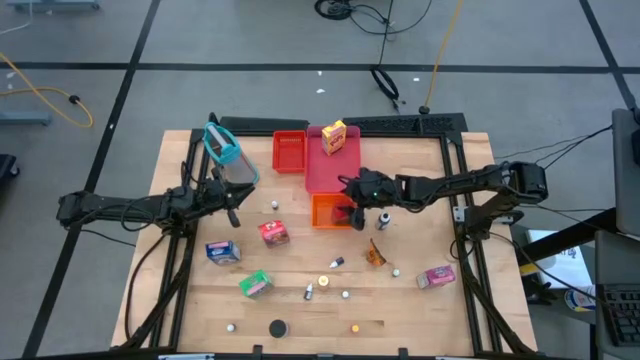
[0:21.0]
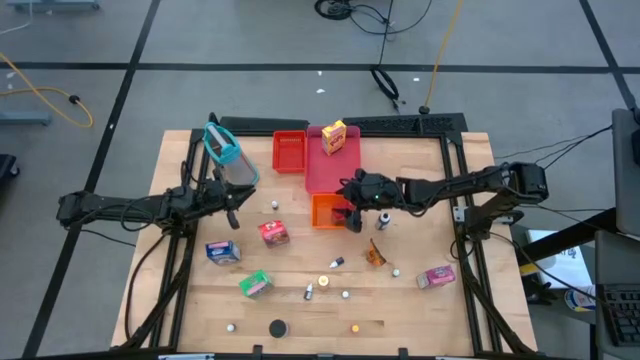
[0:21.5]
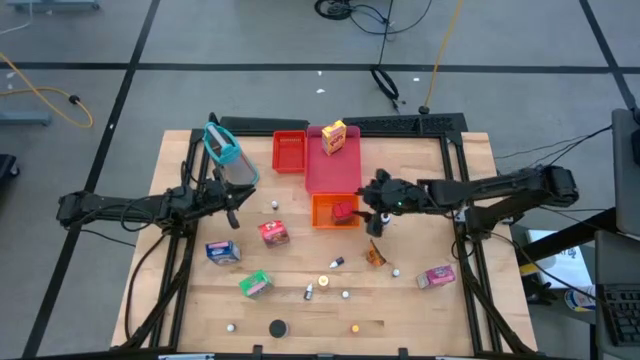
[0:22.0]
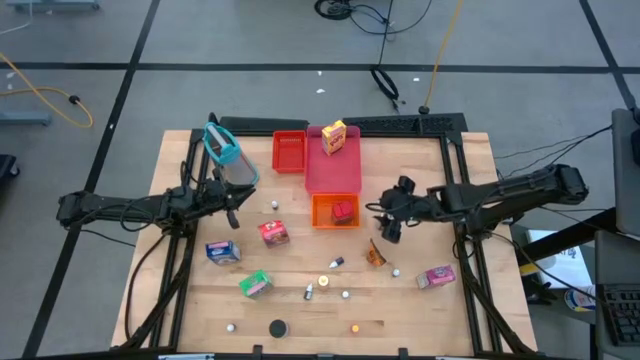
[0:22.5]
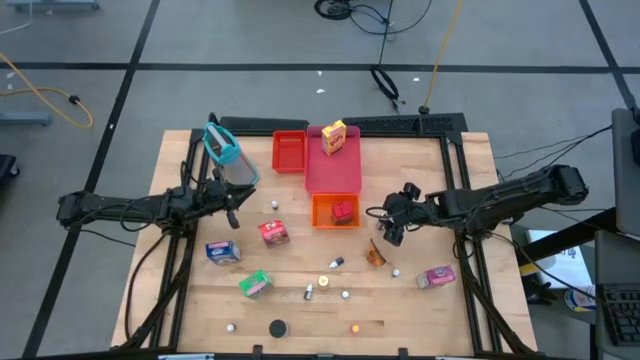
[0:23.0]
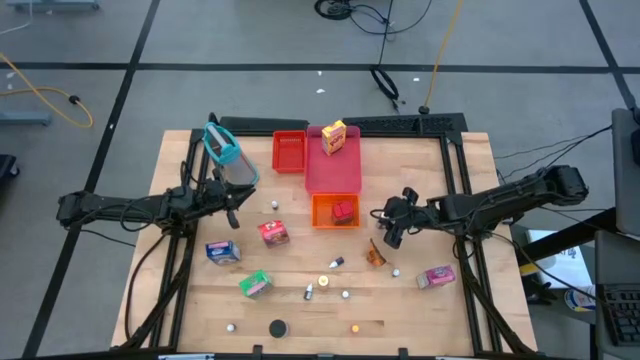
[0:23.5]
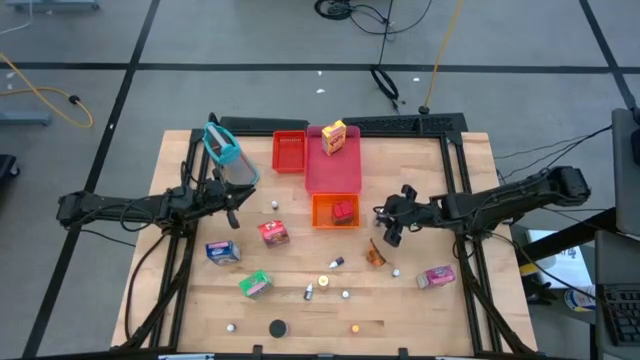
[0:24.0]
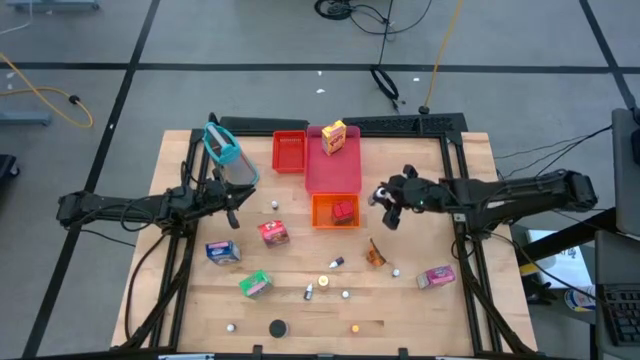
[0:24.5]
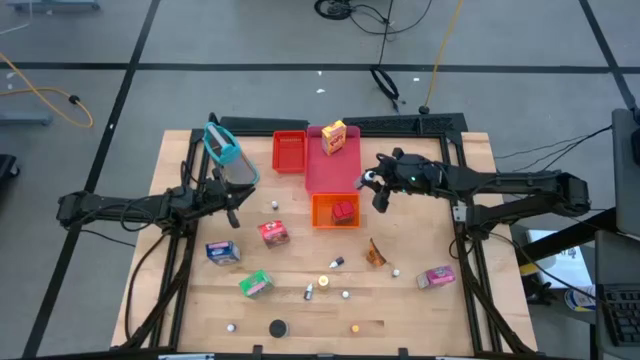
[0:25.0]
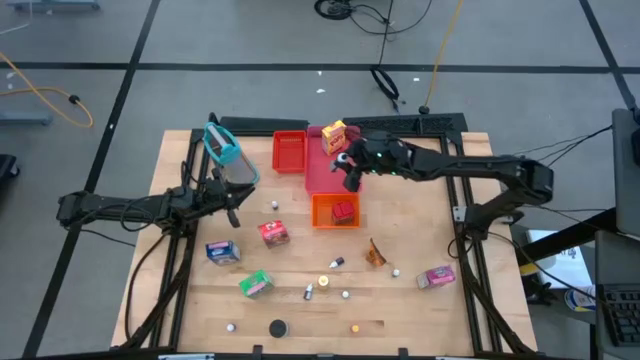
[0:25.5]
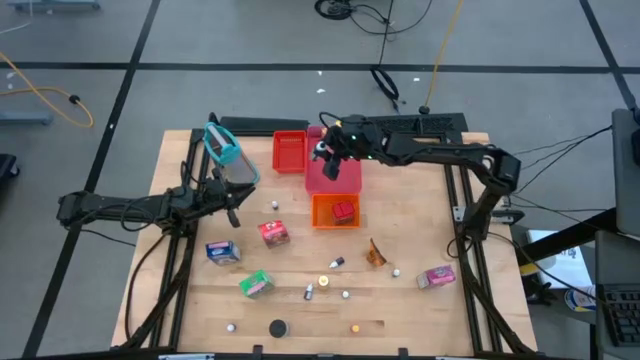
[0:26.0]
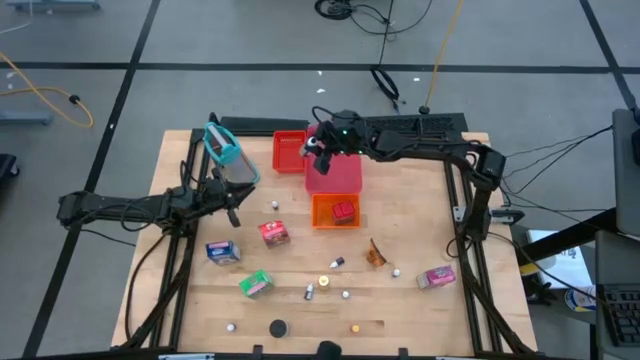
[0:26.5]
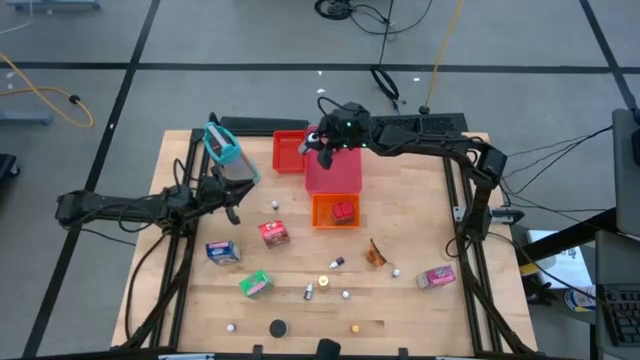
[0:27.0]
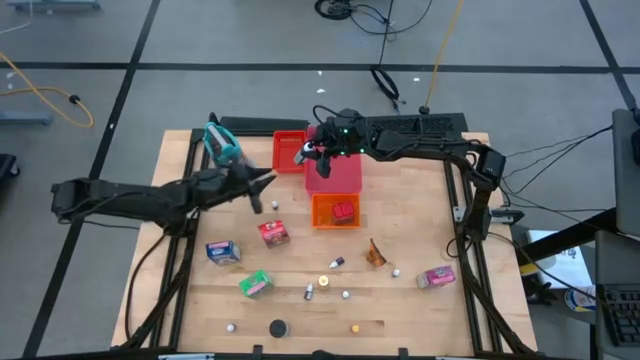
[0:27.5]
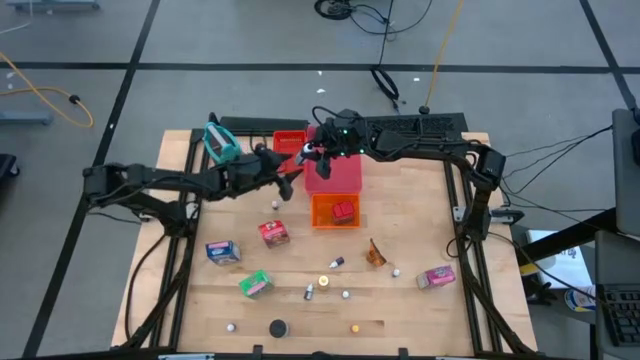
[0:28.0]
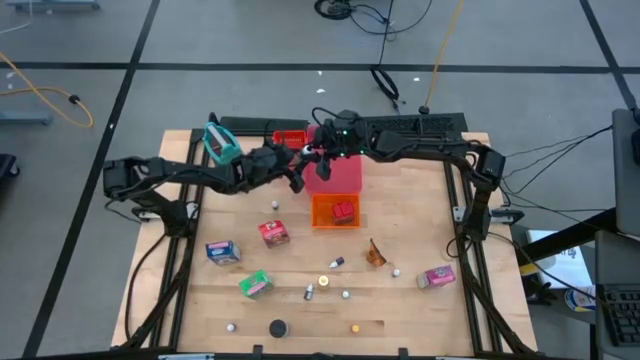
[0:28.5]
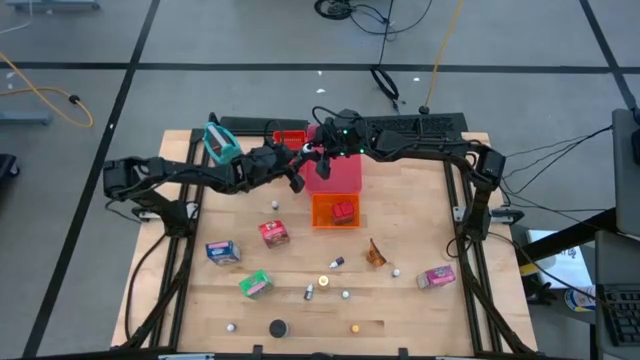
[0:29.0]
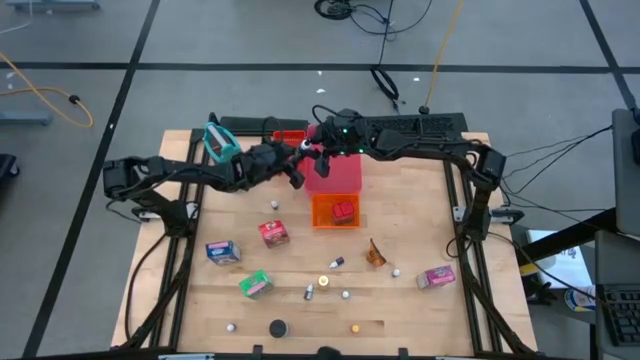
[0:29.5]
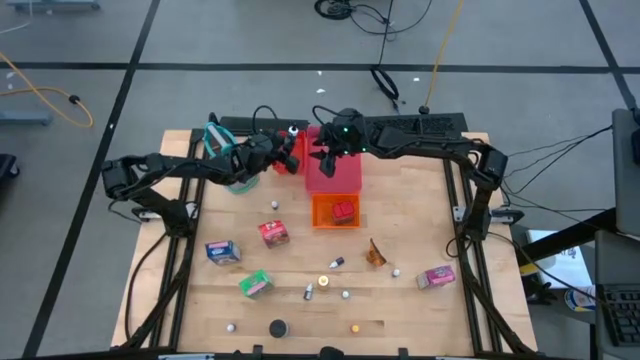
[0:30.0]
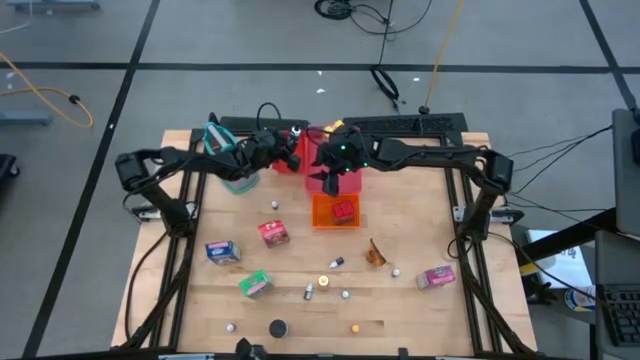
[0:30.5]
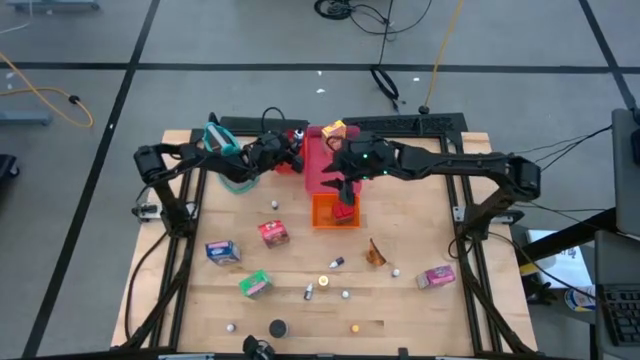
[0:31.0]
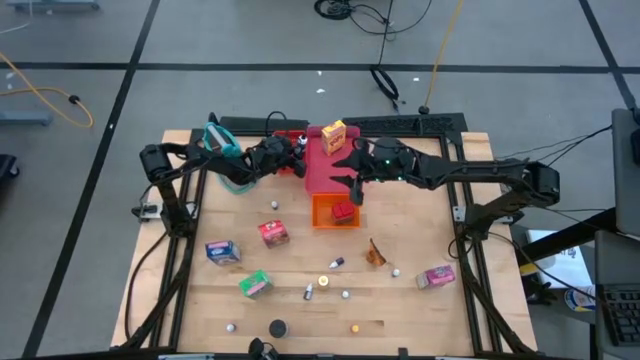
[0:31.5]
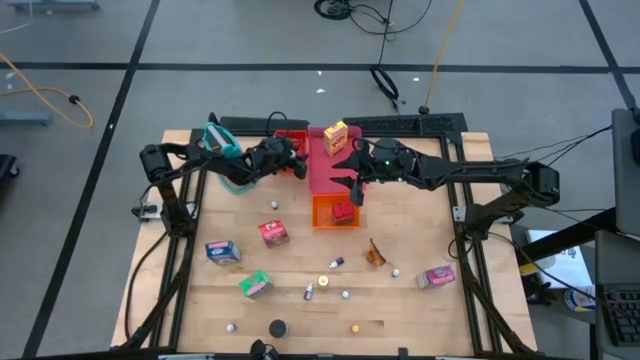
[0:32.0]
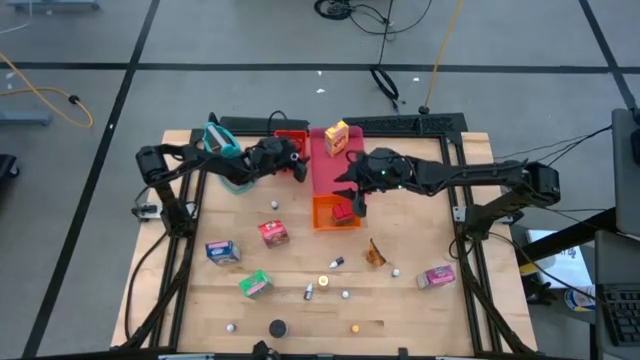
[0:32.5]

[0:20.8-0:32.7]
Task: Pick & Place Kitchen Items
Put the black food coloring bottle into the red bin

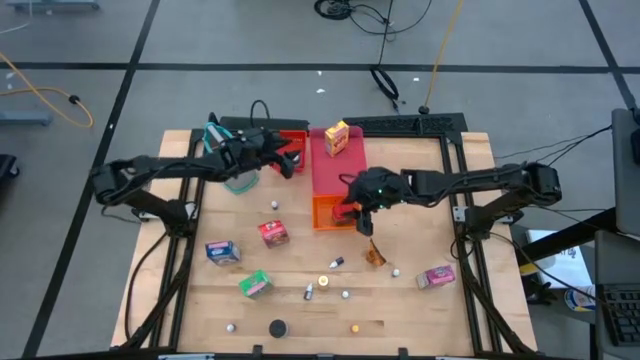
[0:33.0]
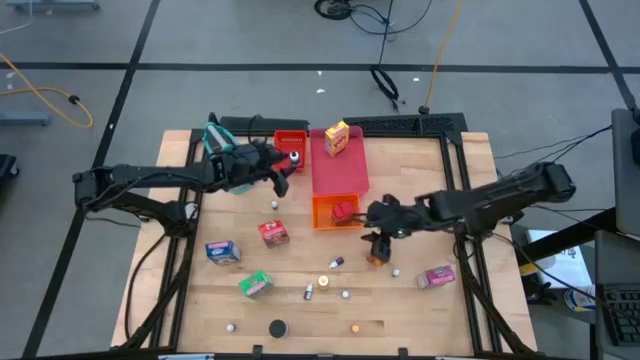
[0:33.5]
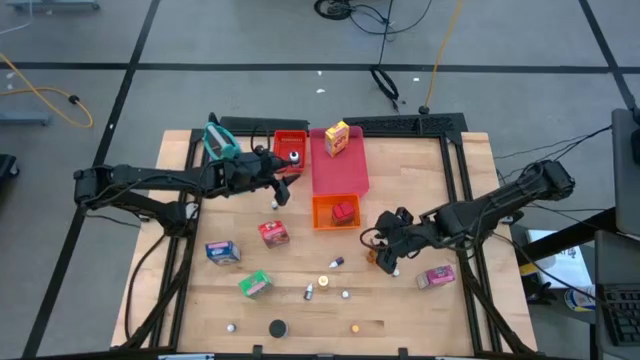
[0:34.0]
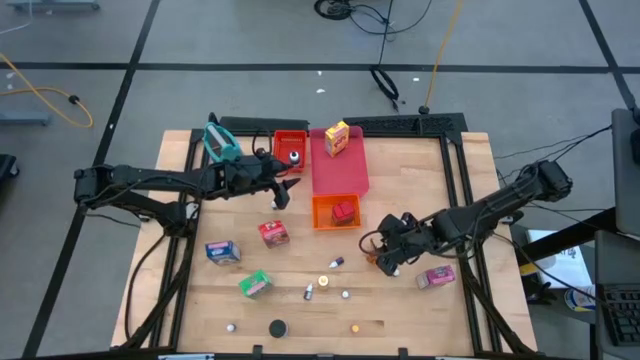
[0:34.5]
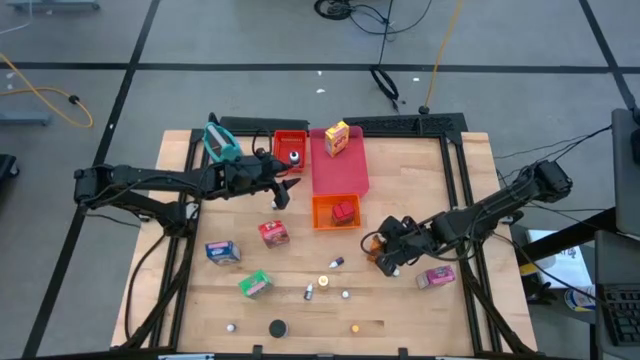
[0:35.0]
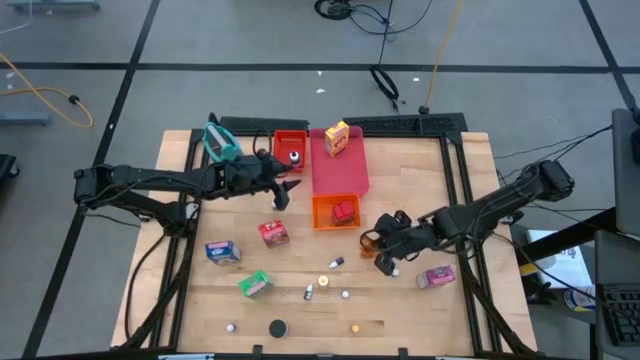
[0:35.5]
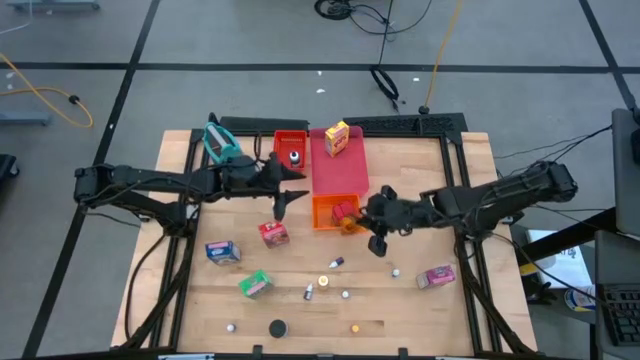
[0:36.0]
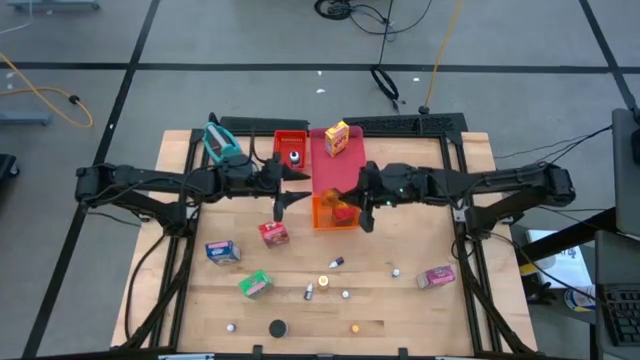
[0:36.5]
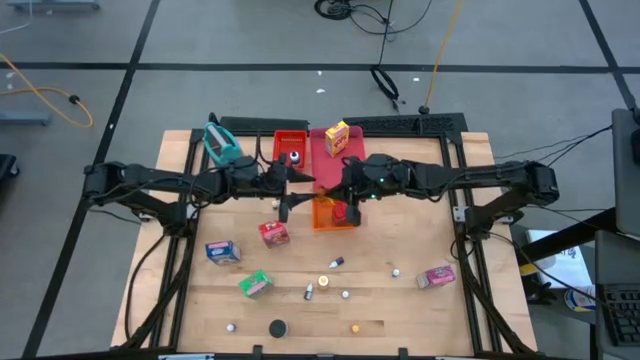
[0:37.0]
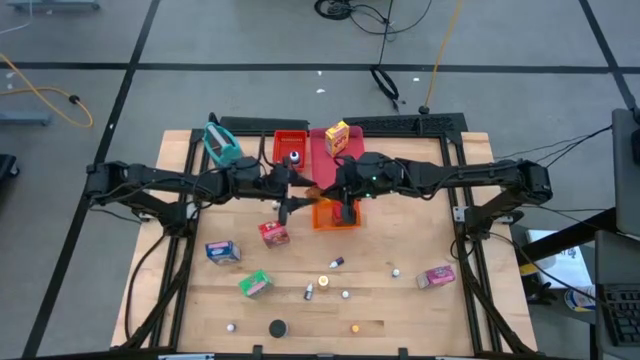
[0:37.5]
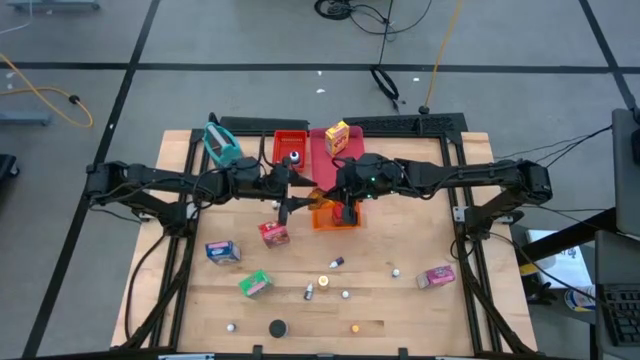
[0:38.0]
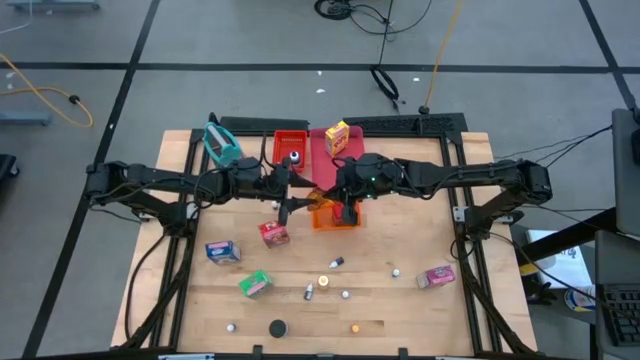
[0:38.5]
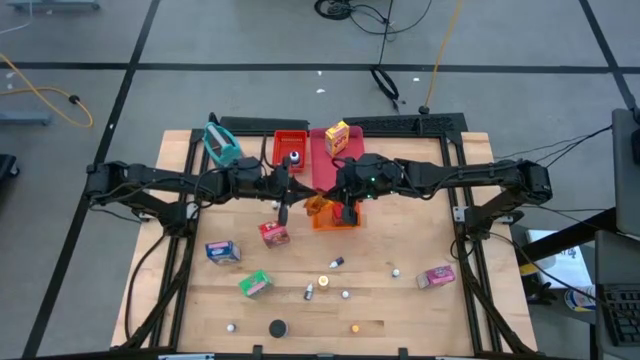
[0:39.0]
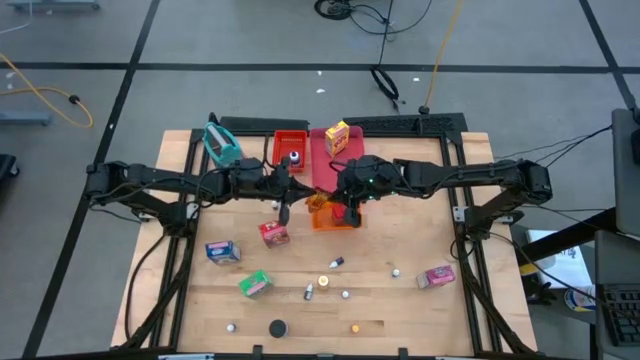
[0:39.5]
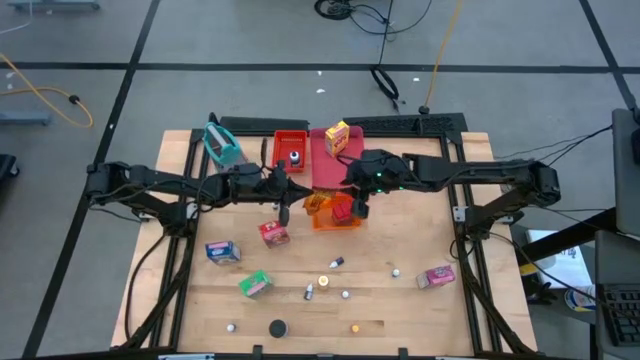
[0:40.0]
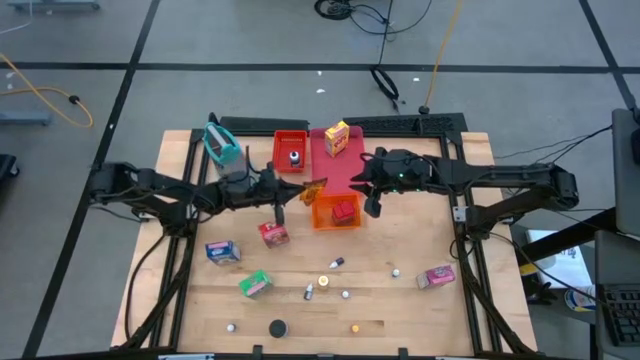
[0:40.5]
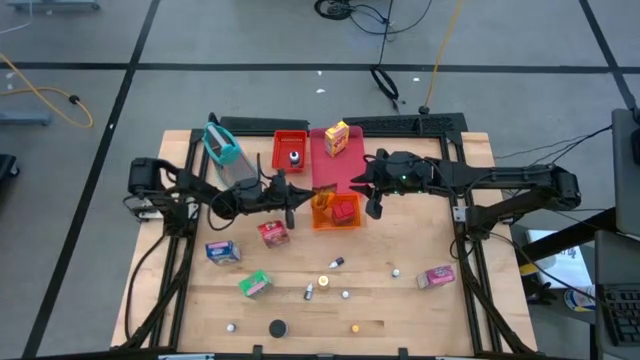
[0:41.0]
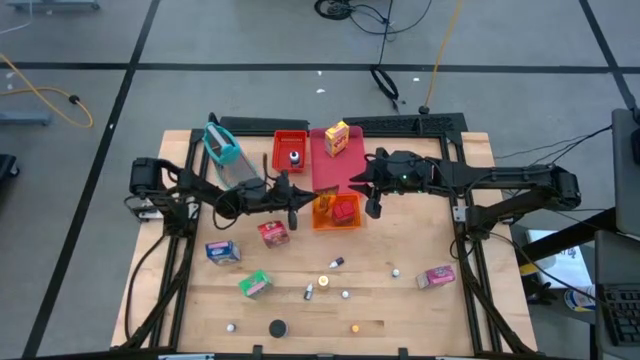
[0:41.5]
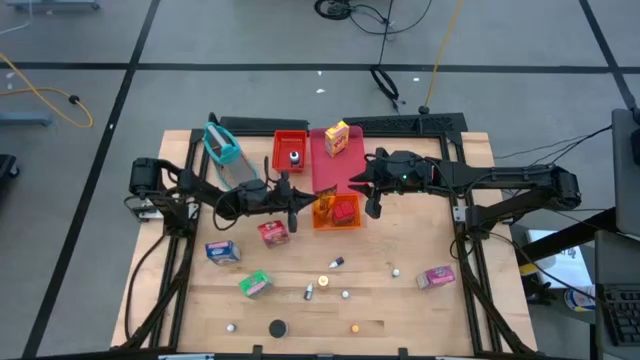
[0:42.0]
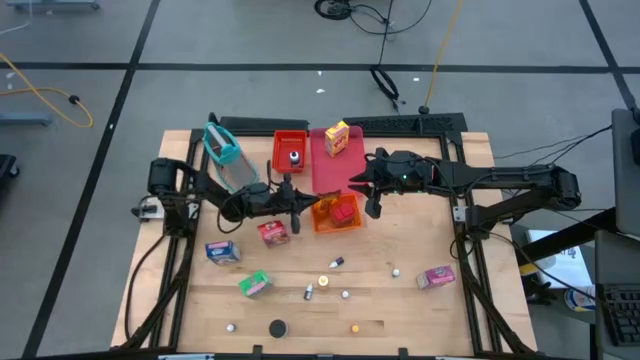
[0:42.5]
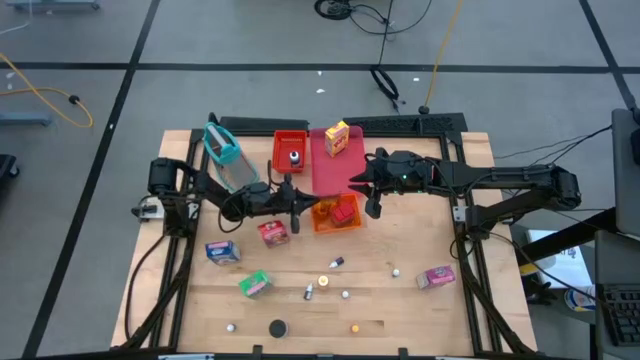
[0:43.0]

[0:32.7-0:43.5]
Put the orange spice bag into the orange bin
